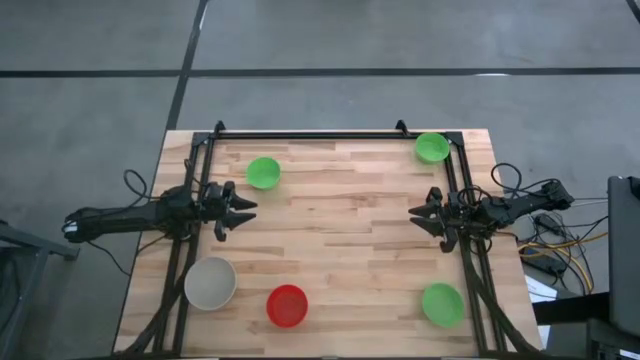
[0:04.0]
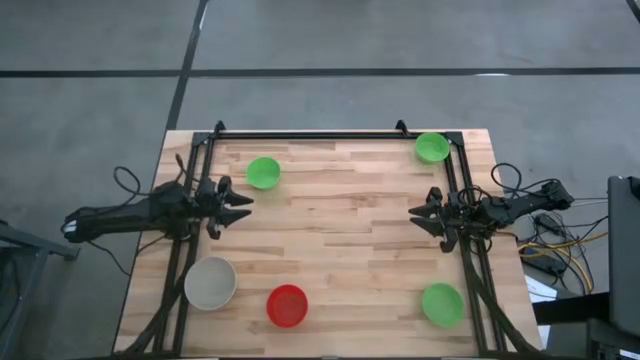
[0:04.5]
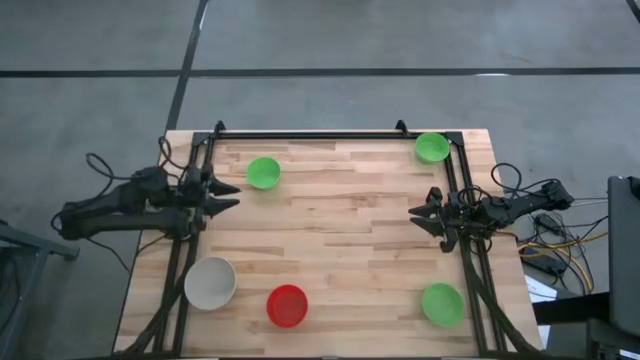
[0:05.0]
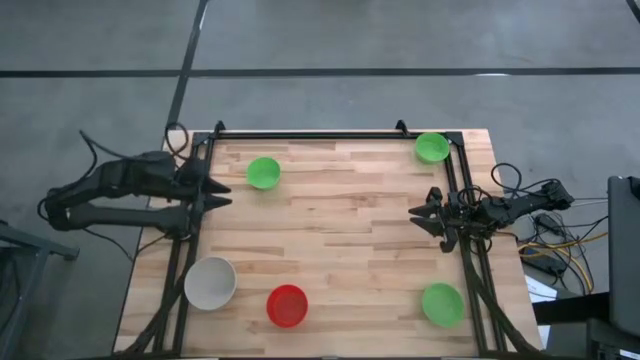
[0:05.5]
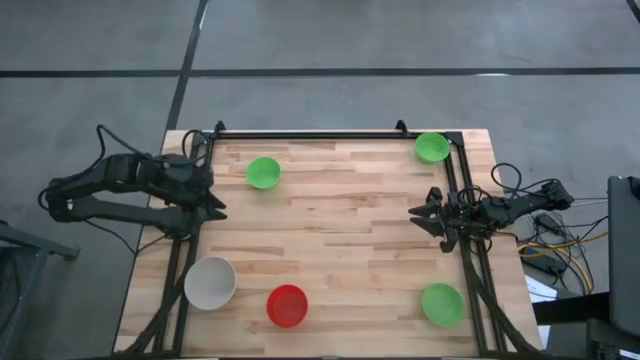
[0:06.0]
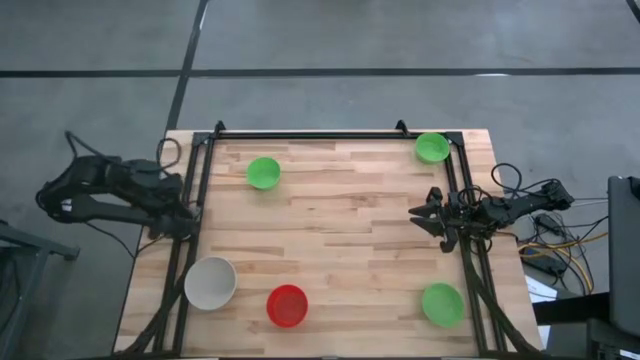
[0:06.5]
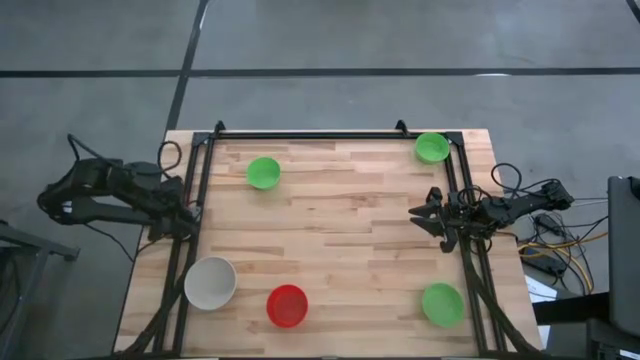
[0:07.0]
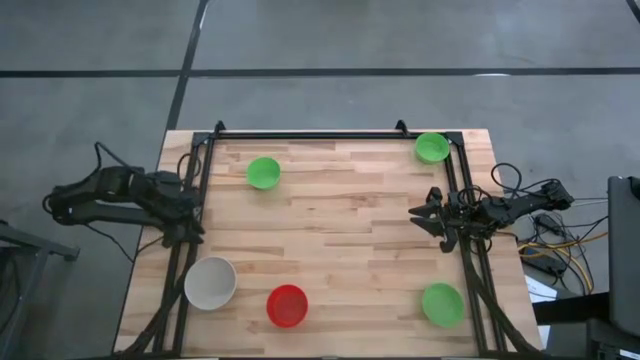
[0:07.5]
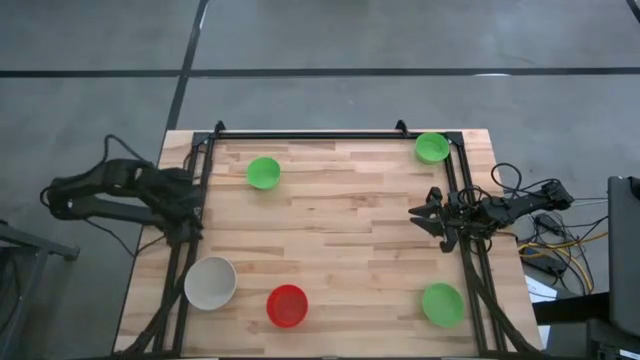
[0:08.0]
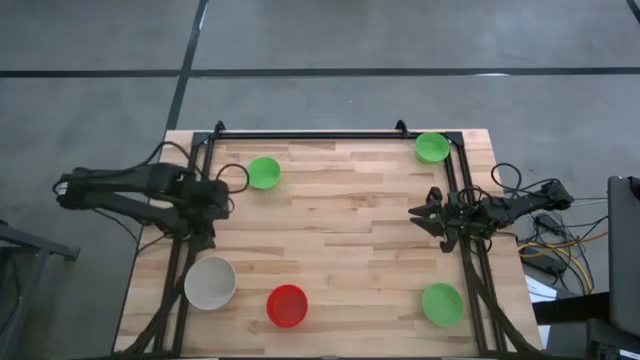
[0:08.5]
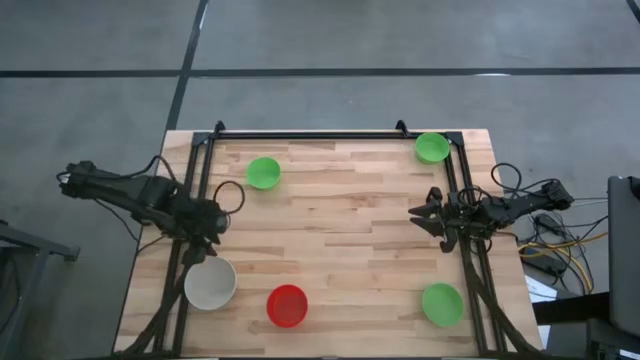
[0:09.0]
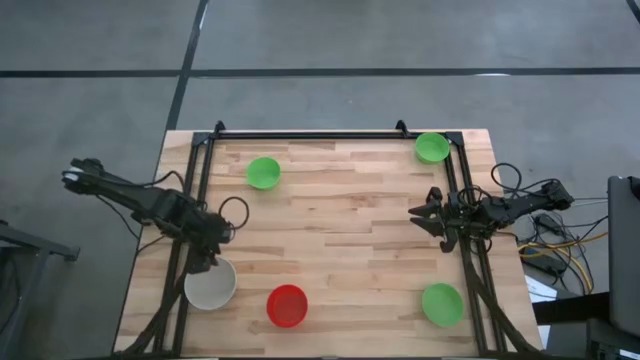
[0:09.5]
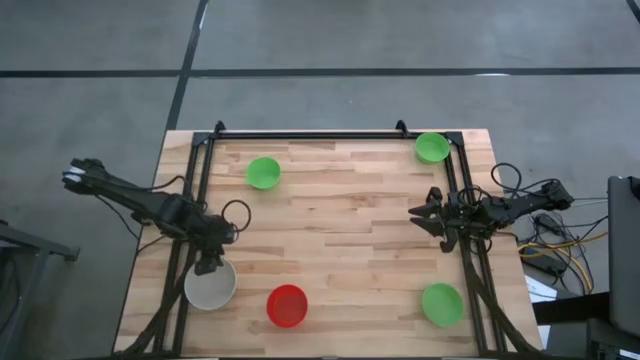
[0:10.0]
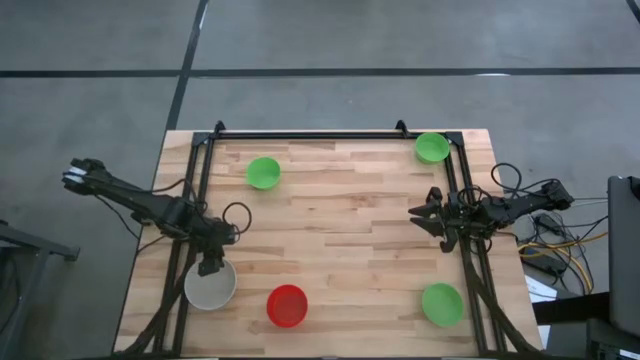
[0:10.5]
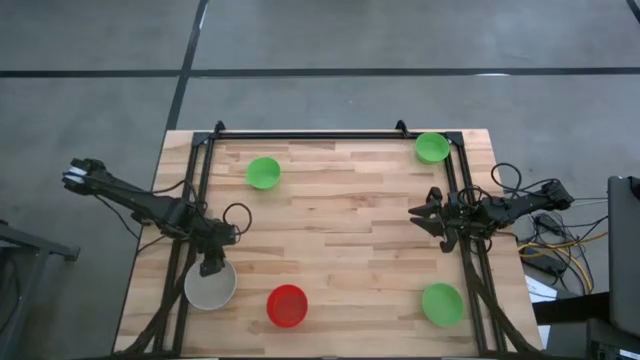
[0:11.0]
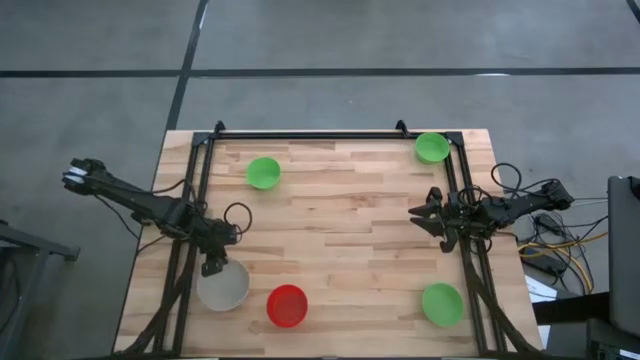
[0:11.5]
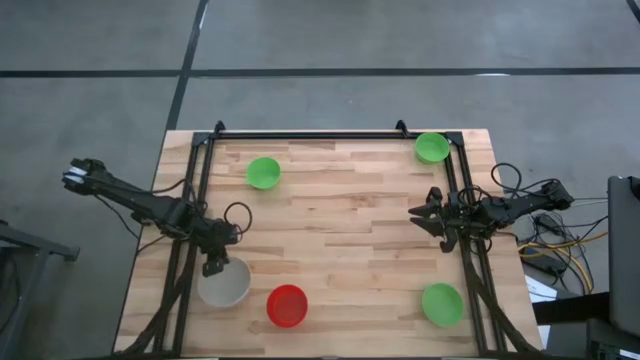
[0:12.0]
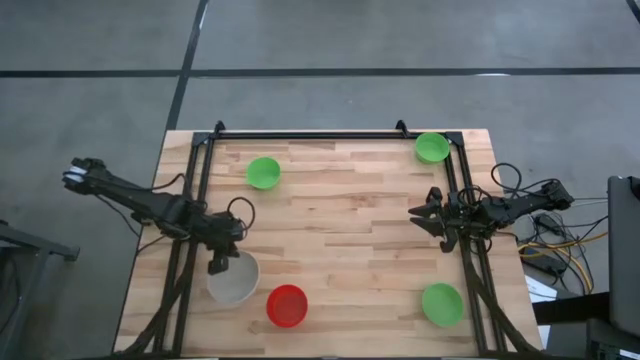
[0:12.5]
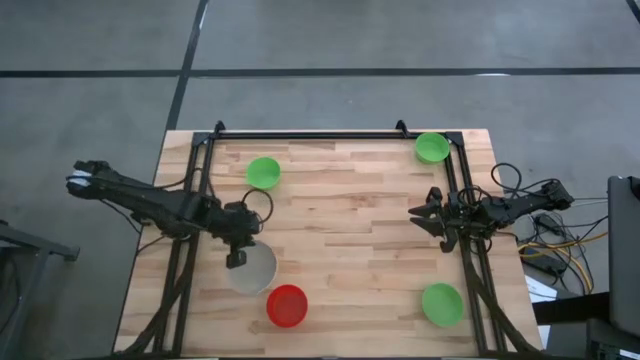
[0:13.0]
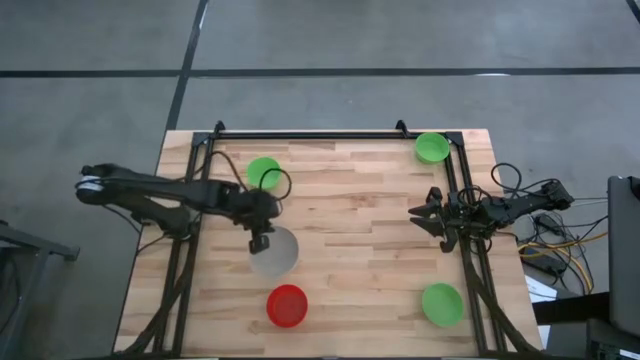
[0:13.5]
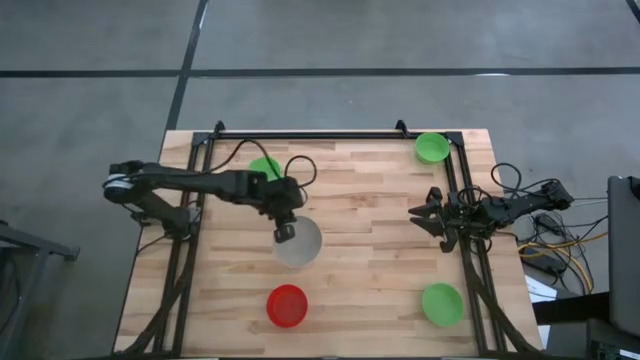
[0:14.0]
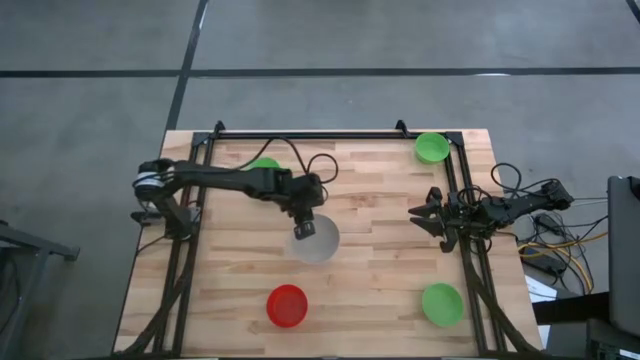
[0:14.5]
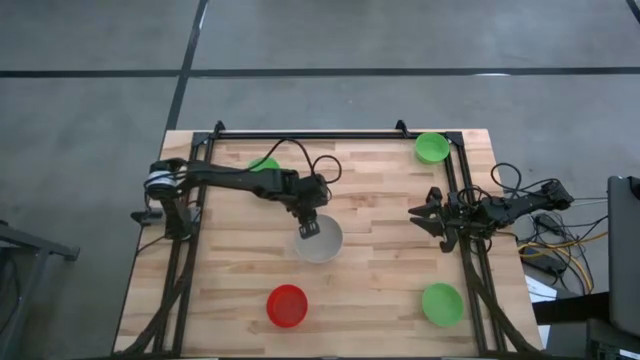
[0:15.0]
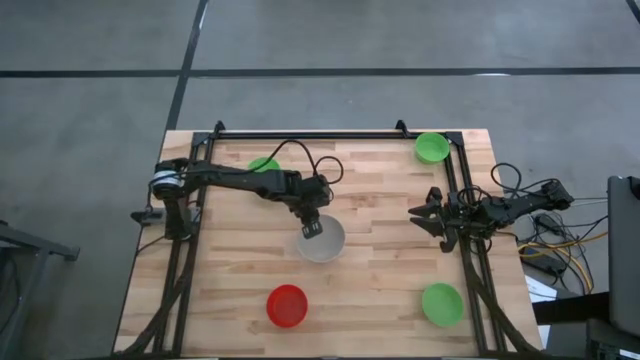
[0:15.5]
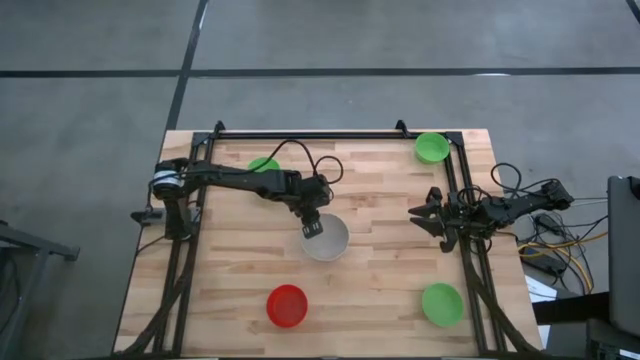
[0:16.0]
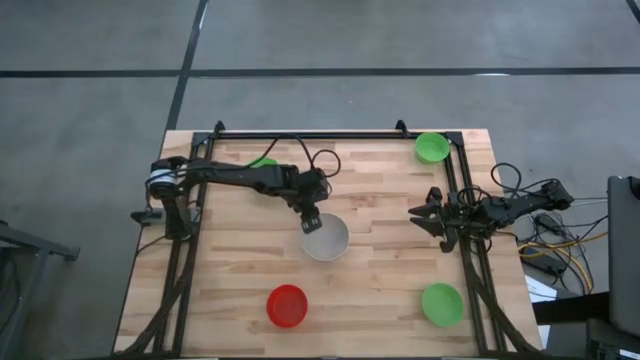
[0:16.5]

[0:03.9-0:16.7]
Put the gray bowl on the center of the table

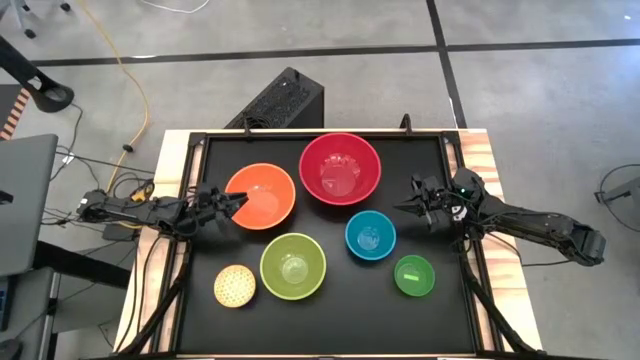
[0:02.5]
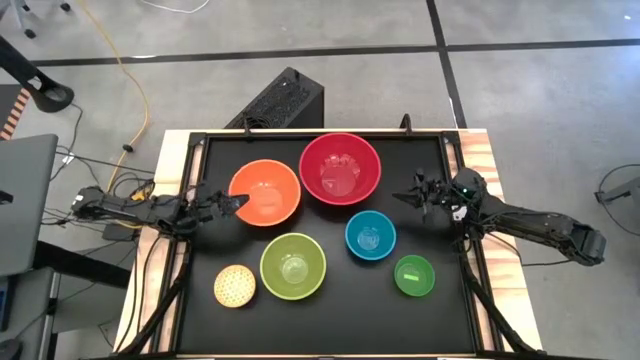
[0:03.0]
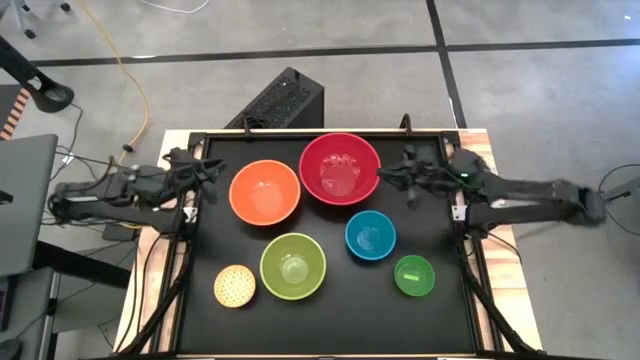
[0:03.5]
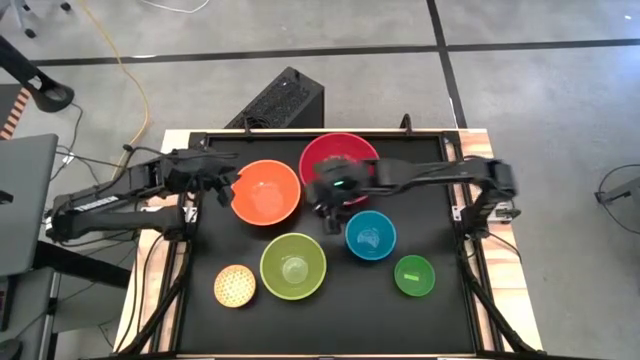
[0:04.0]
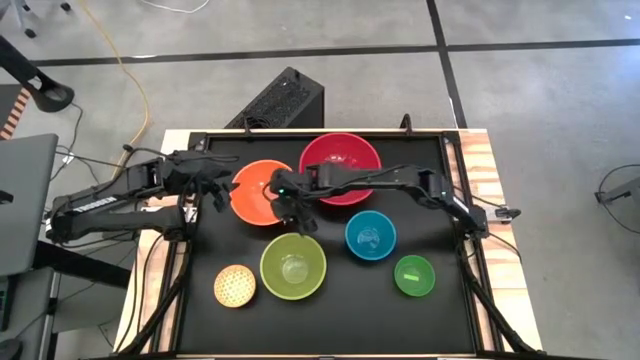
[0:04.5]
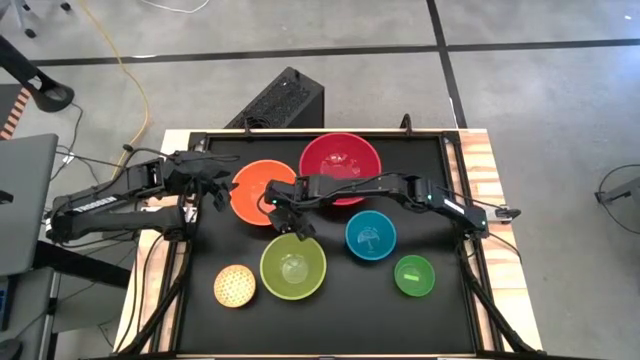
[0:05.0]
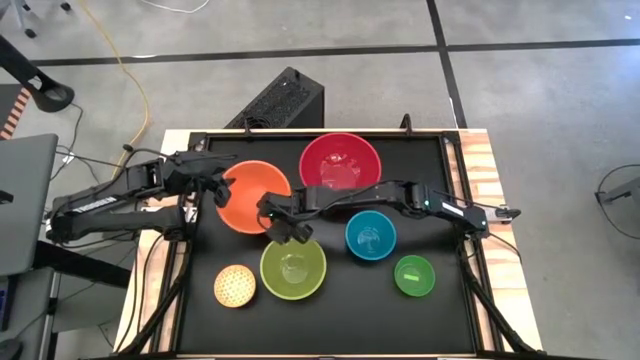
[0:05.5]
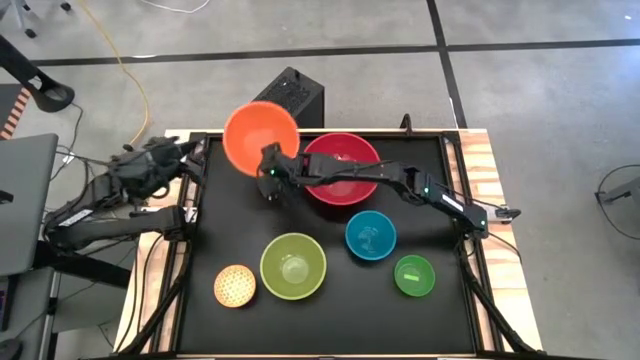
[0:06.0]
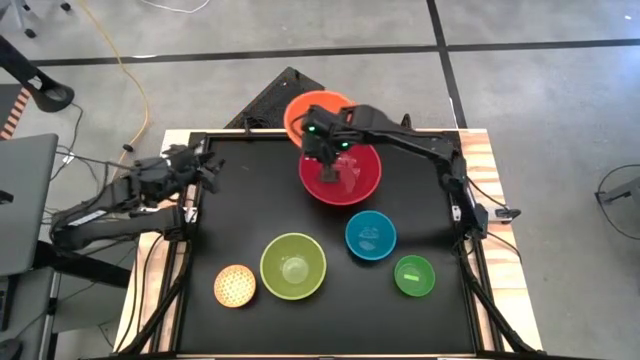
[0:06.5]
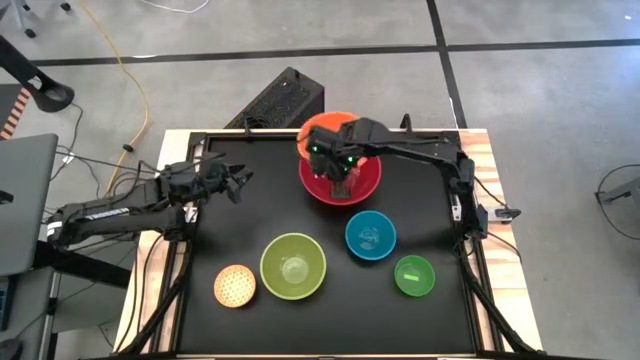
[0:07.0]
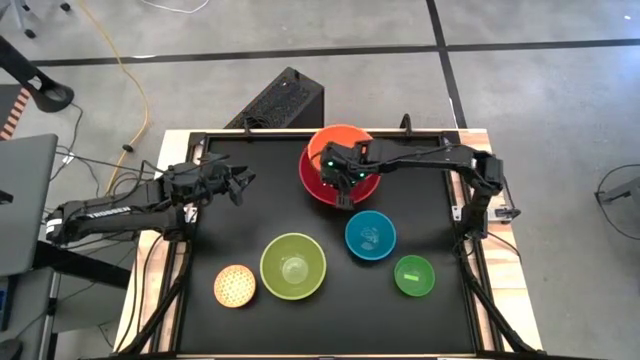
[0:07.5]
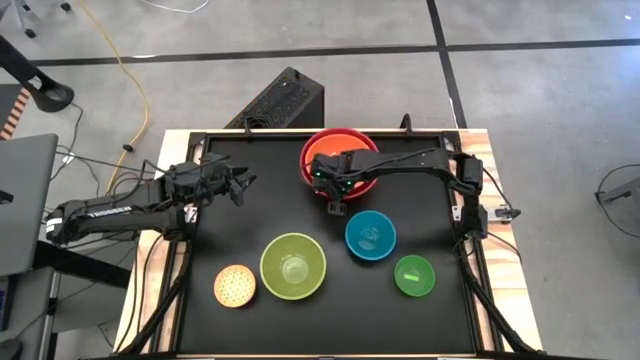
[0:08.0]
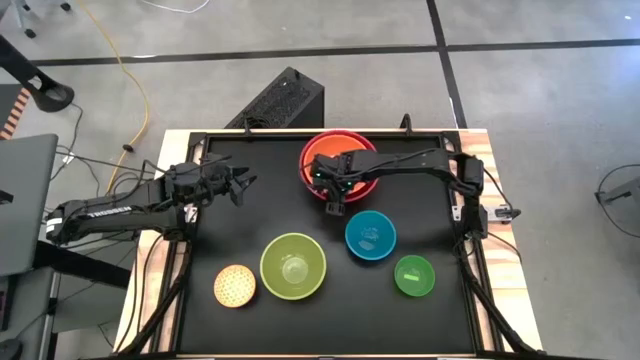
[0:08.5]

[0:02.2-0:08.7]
Stack the orange bowl on top of the red bowl
